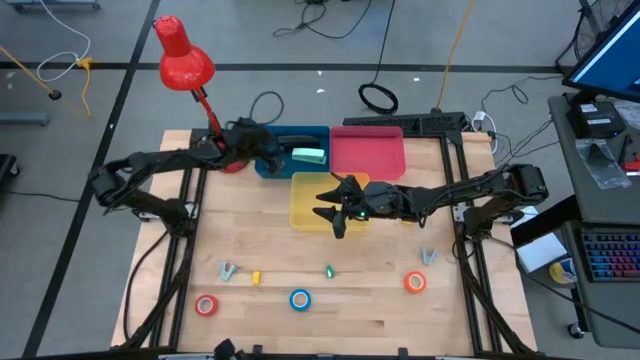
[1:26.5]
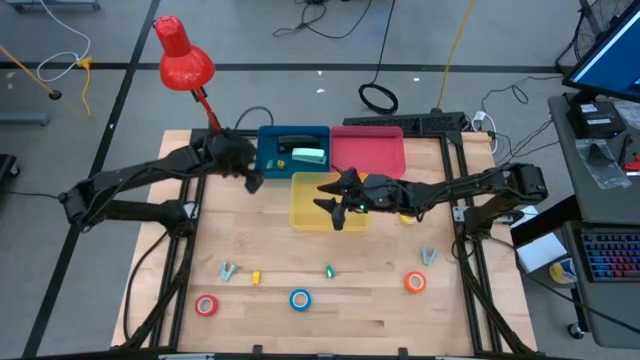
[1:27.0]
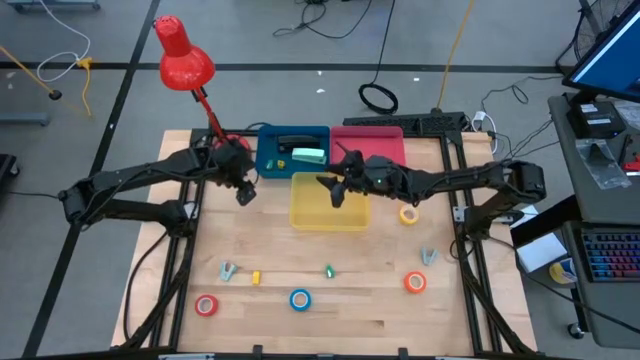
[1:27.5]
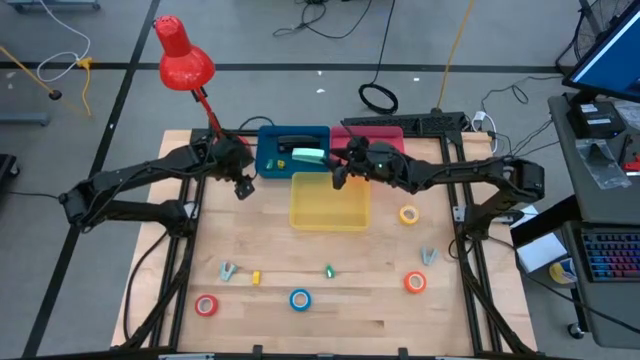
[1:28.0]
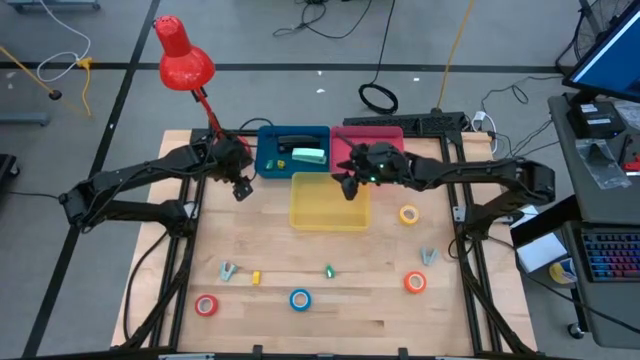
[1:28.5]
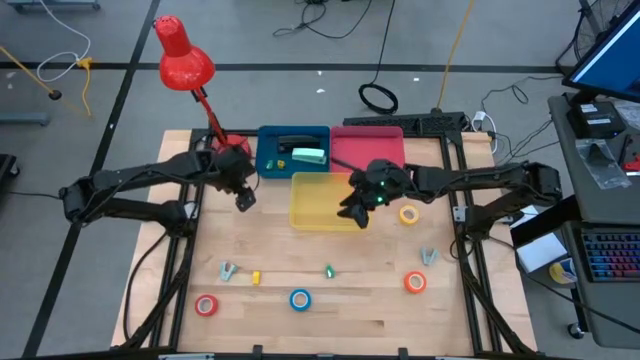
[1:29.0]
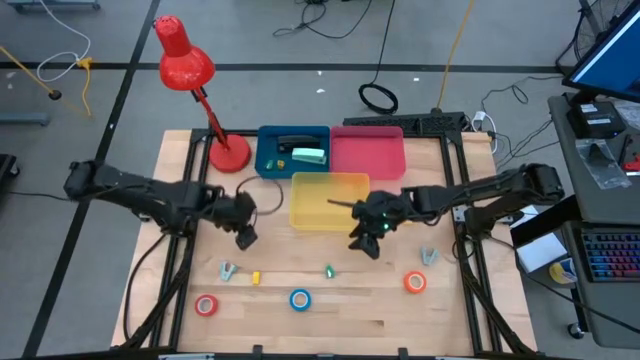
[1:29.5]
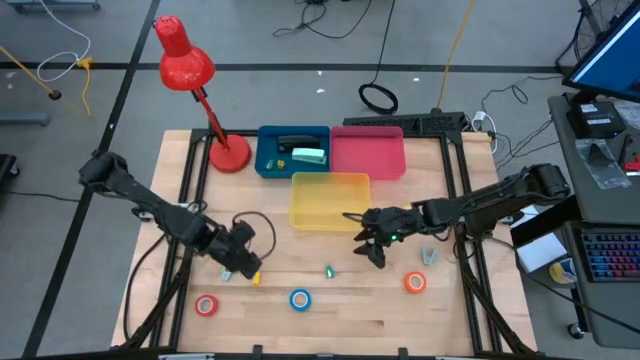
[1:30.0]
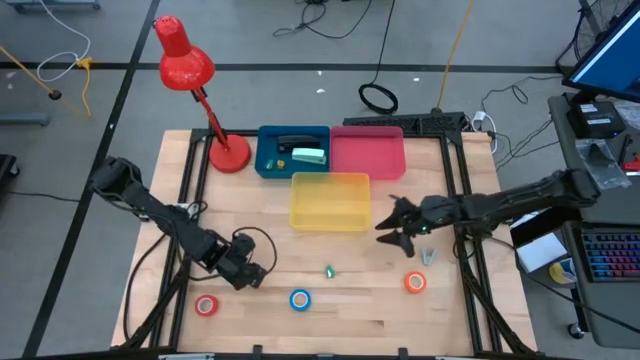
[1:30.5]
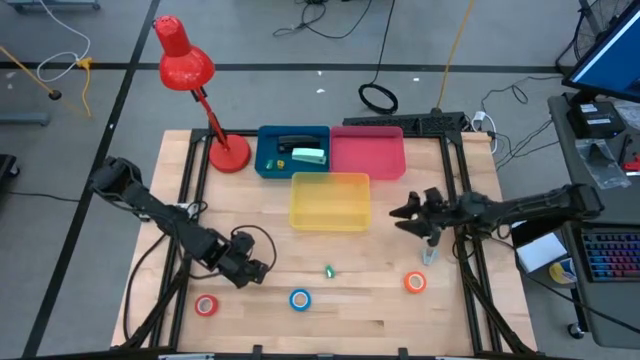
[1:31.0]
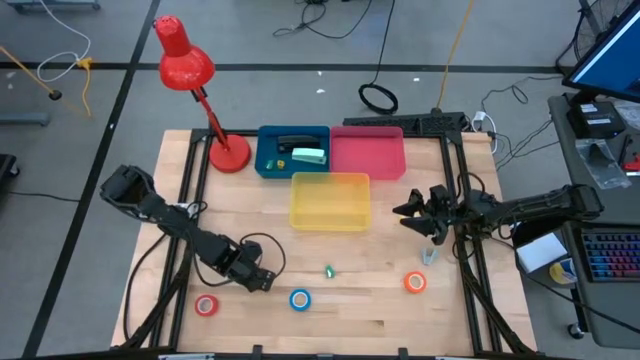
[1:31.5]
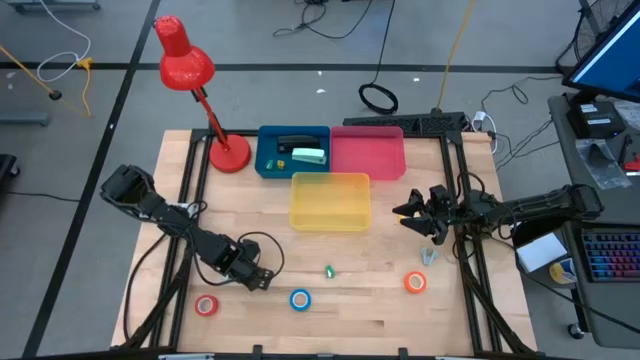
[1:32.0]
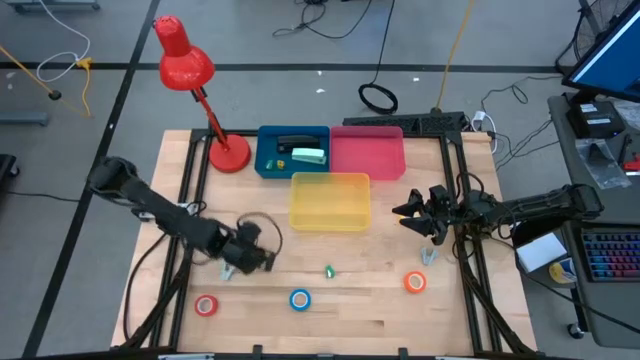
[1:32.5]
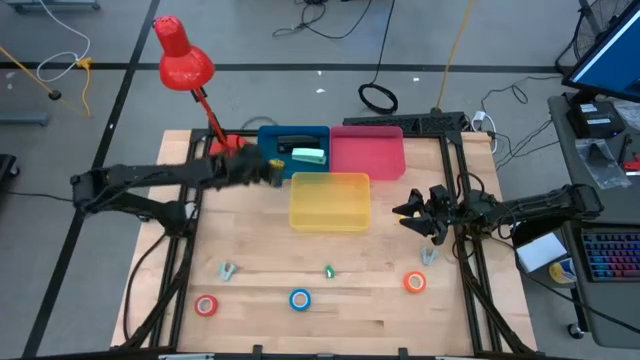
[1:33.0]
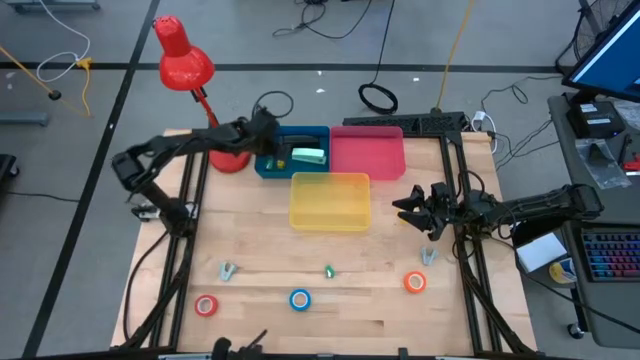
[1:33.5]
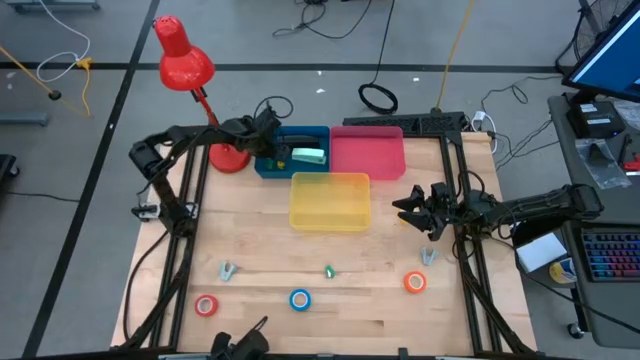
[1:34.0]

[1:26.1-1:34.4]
Task: Pick and place Stapler, Stapler remover, tape
Put the yellow stapler into the blue bin

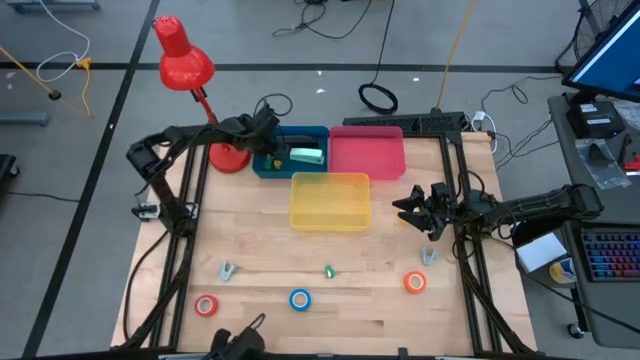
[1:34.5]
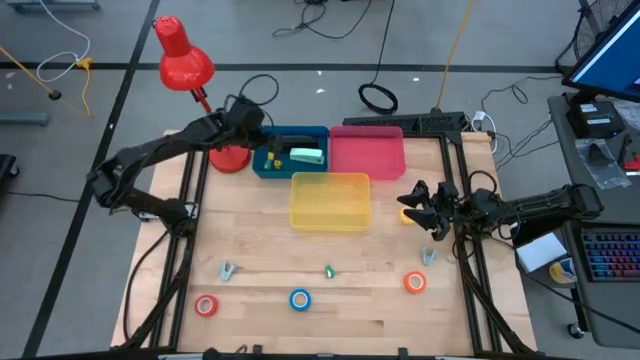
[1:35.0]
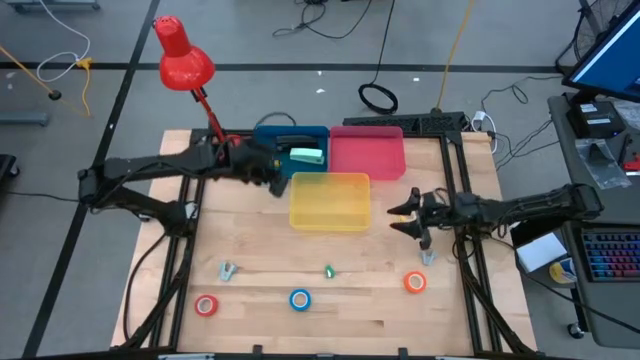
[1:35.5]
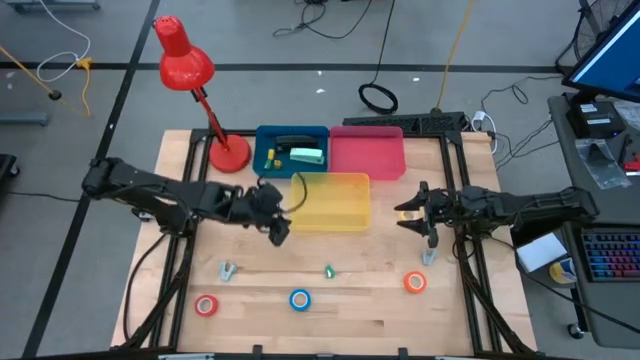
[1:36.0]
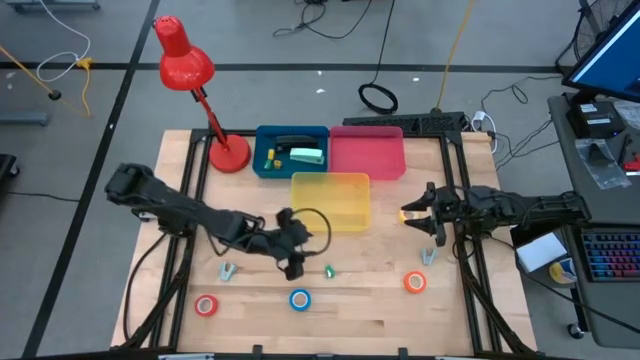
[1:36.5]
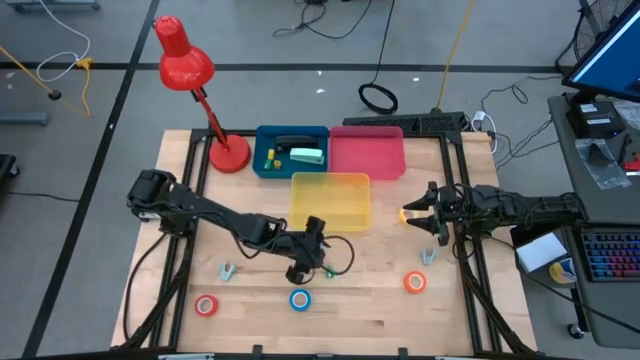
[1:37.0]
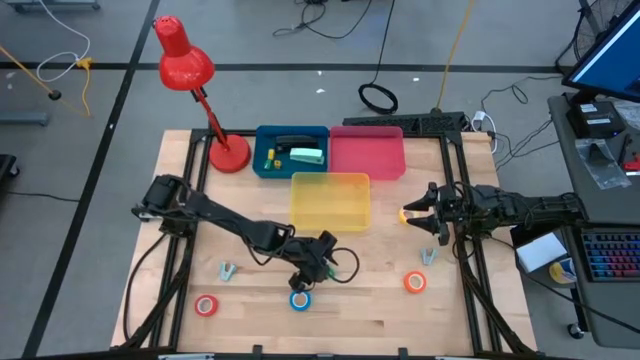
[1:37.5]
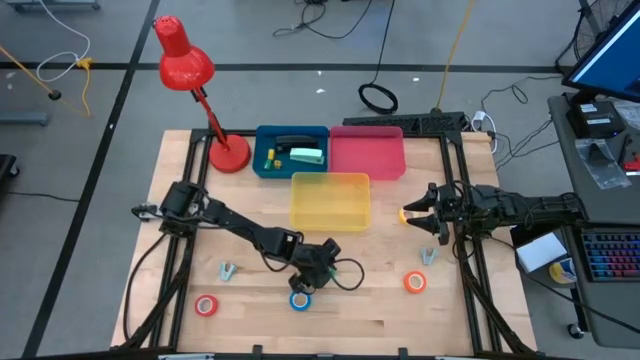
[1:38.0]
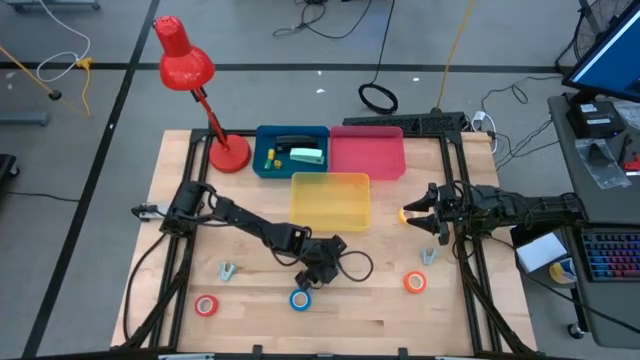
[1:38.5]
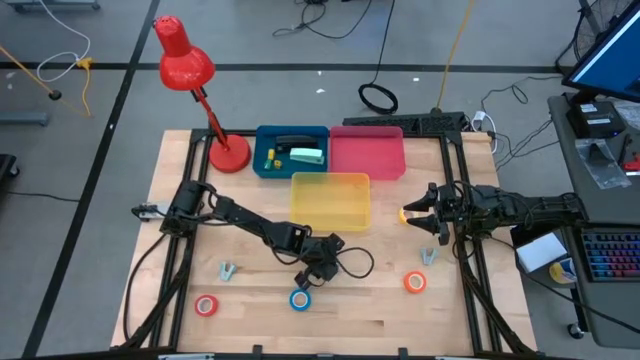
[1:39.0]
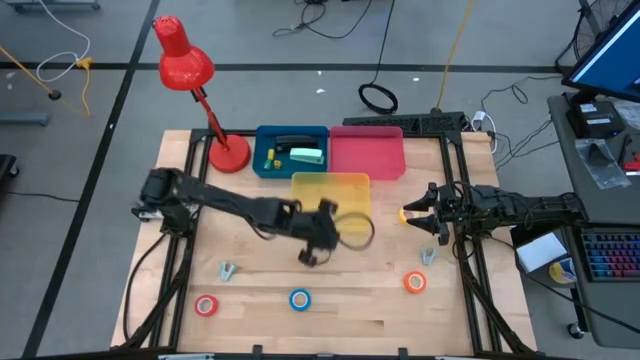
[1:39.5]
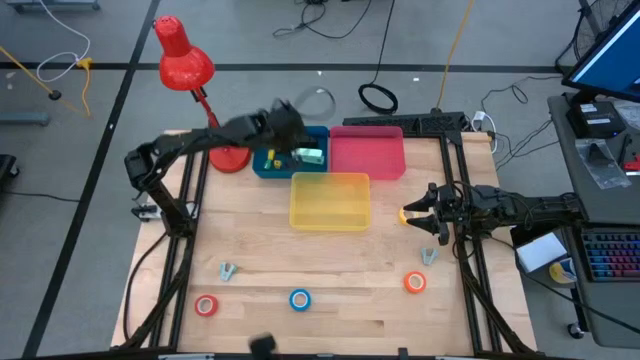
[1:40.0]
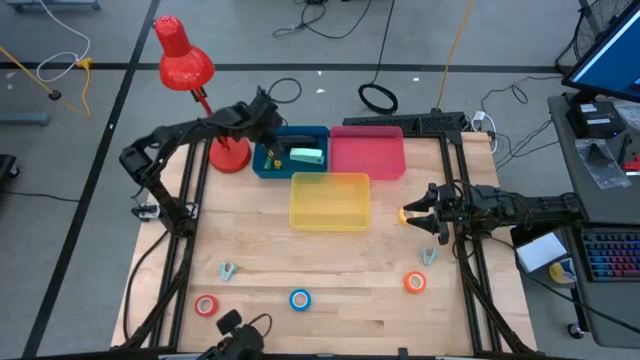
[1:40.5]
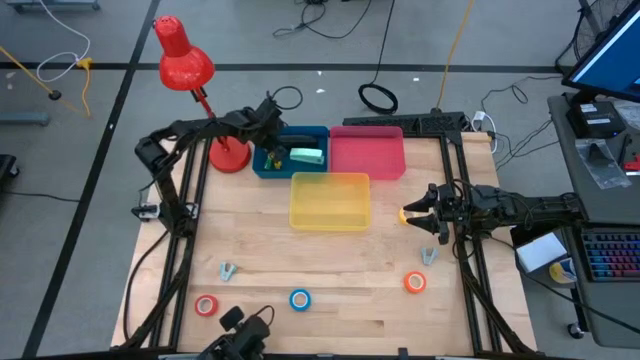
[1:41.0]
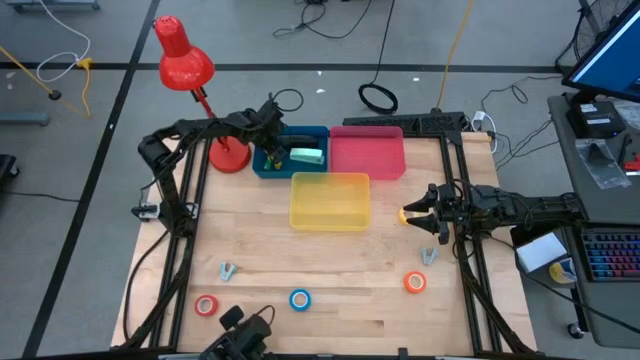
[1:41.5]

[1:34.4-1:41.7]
Put the green stapler into the blue bin

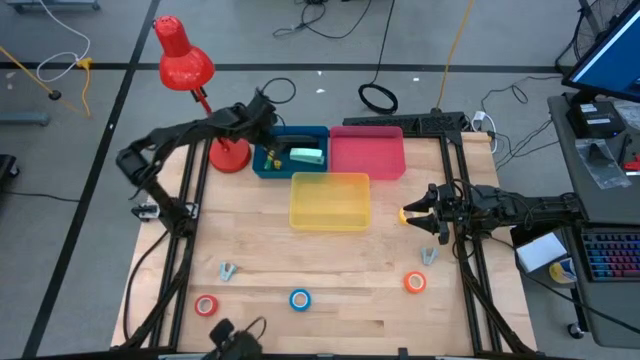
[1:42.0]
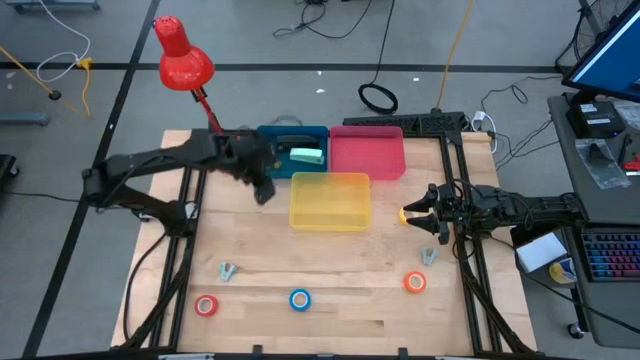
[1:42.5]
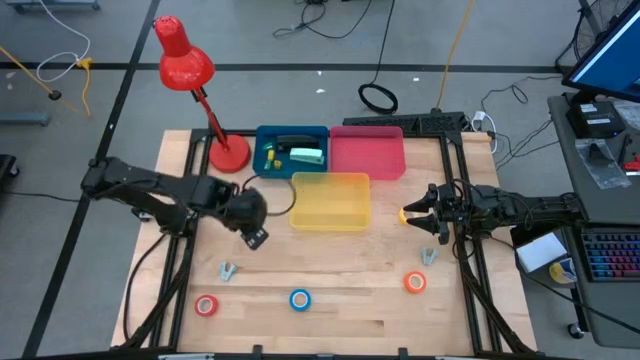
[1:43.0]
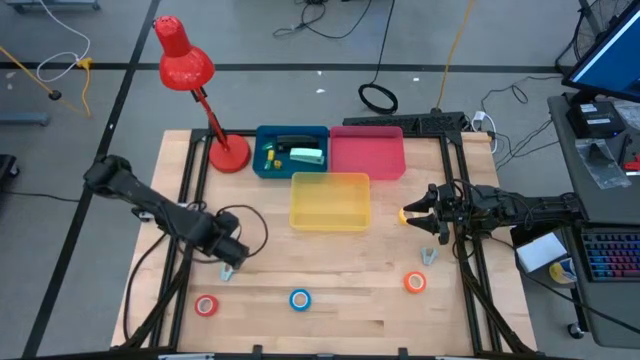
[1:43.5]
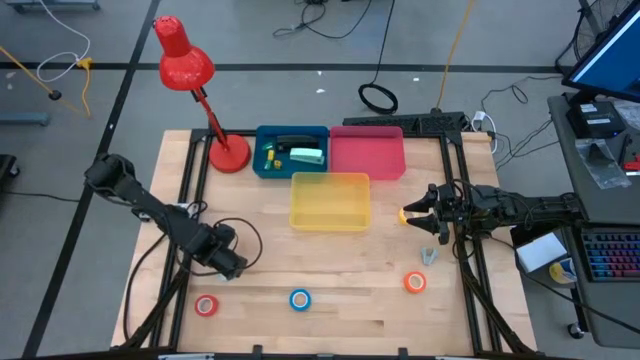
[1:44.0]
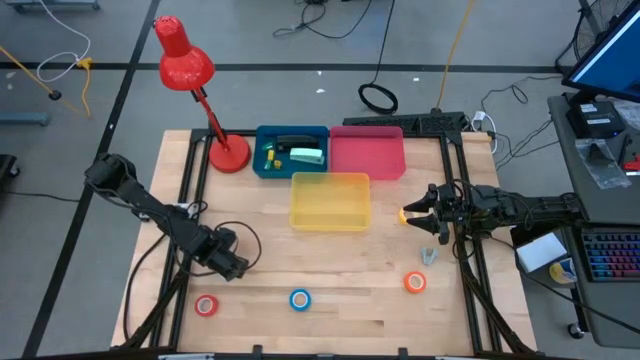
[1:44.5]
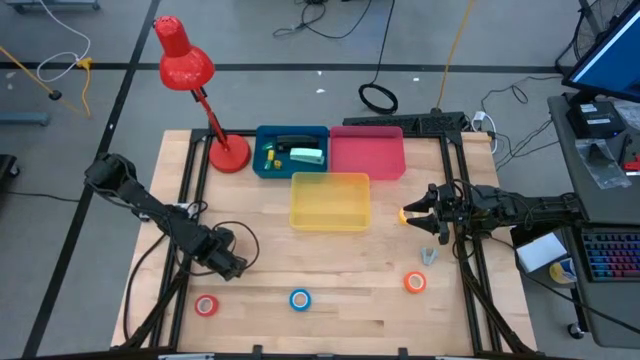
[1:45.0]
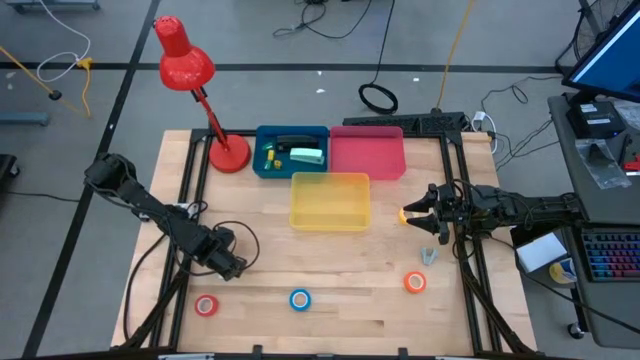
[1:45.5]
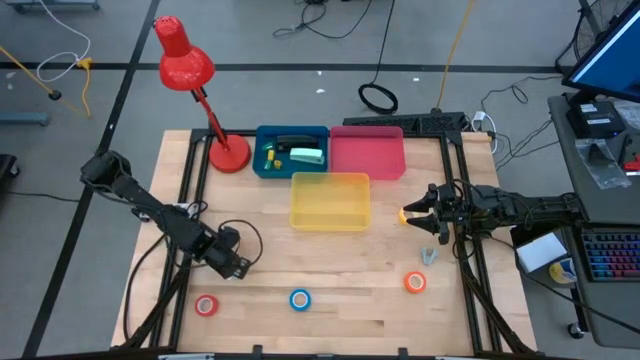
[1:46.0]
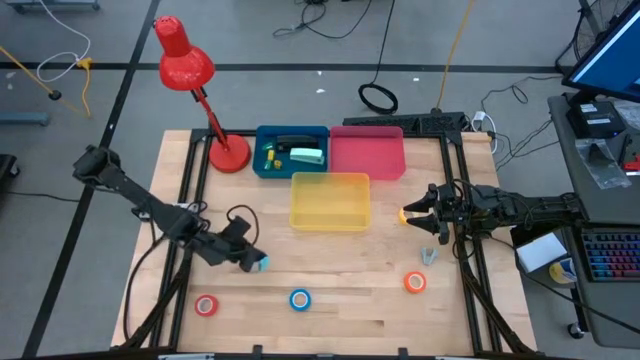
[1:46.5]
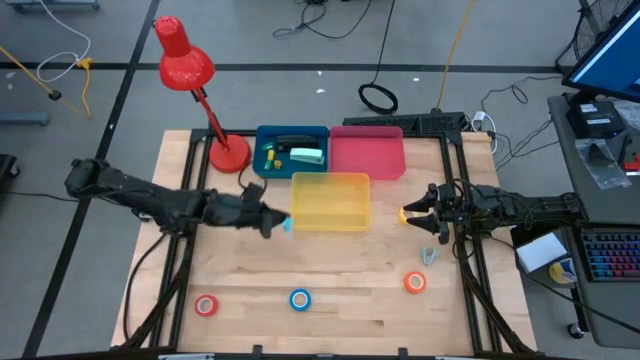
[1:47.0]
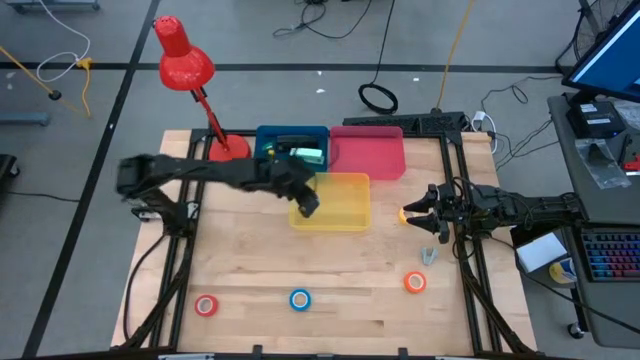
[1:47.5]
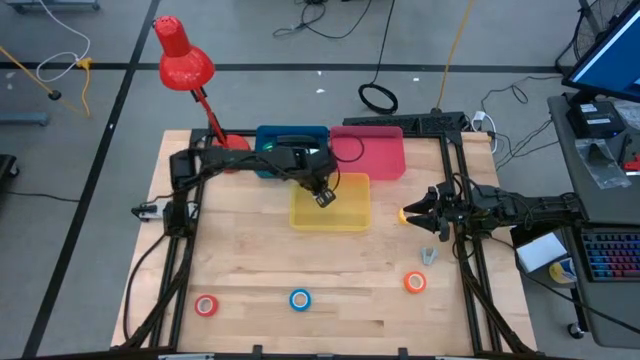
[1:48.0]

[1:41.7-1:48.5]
Put the green staple remover into the yellow bin

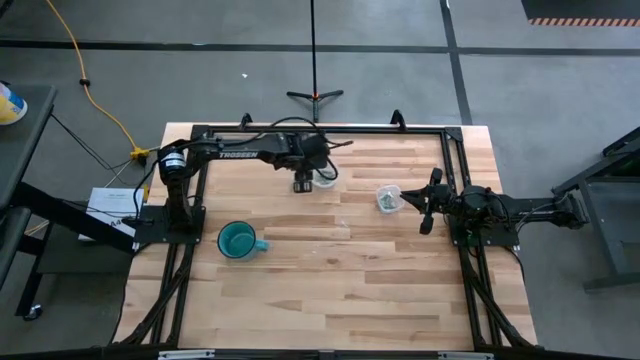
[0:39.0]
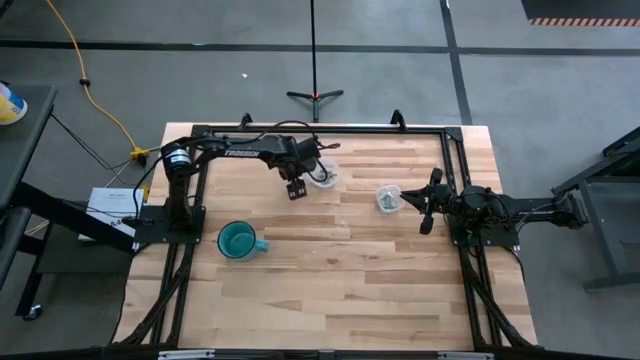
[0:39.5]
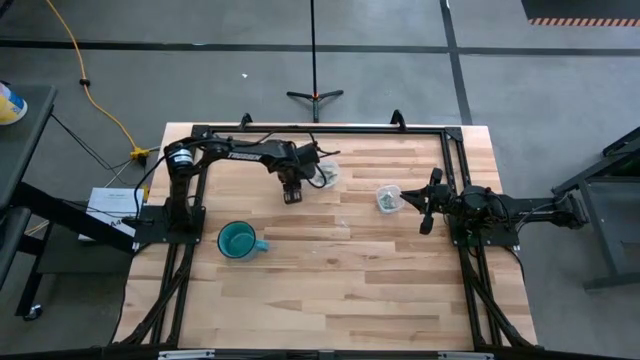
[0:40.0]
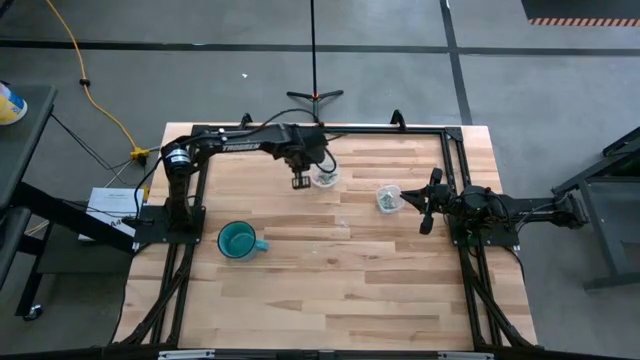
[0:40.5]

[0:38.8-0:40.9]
Task: Pick and place items into bin
Put the stevia packet into the top transparent bin
